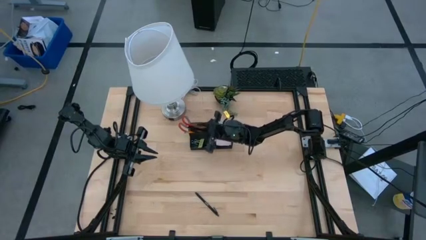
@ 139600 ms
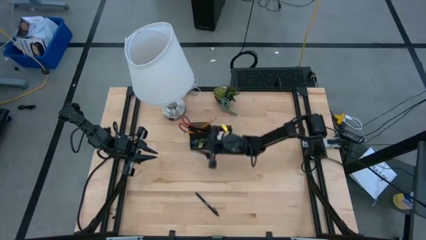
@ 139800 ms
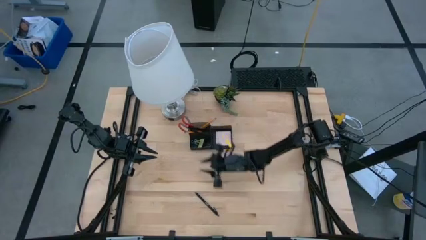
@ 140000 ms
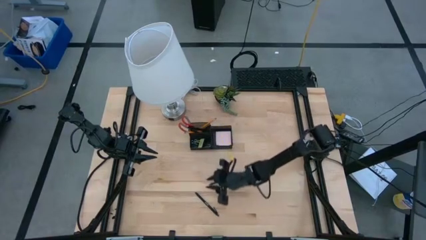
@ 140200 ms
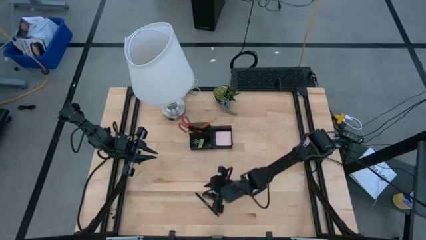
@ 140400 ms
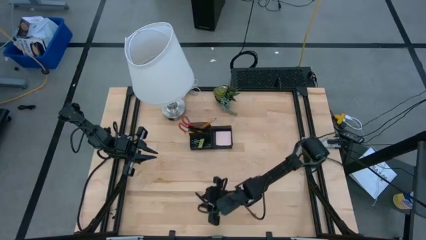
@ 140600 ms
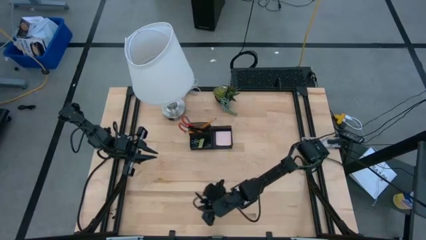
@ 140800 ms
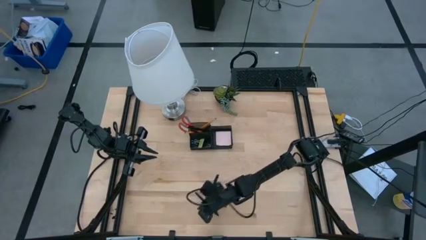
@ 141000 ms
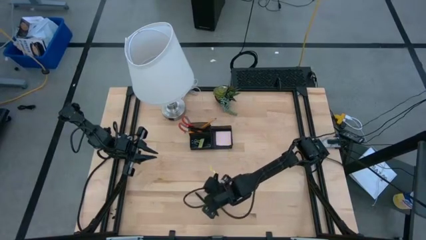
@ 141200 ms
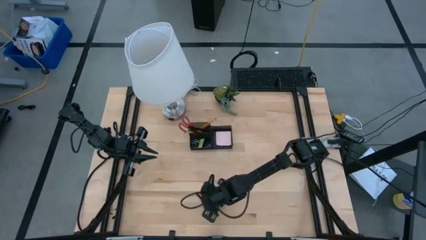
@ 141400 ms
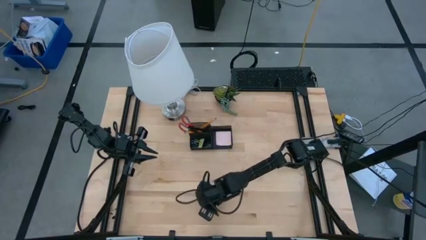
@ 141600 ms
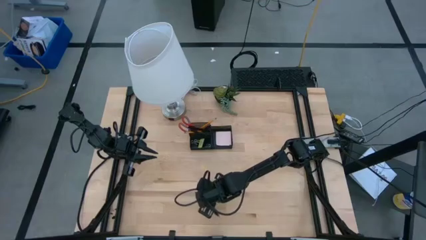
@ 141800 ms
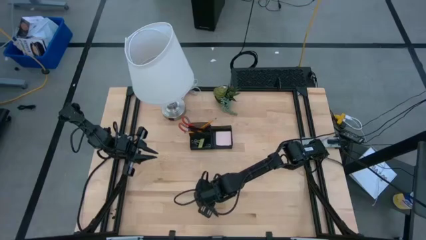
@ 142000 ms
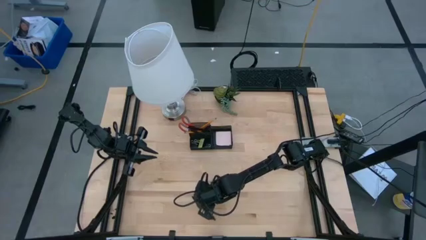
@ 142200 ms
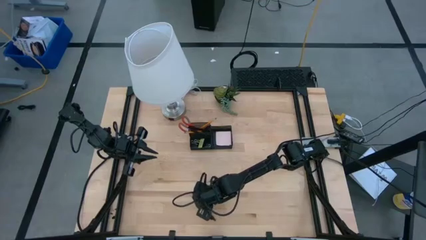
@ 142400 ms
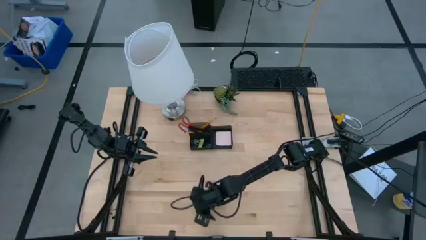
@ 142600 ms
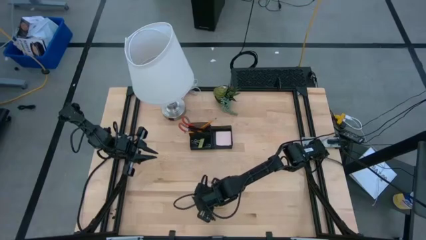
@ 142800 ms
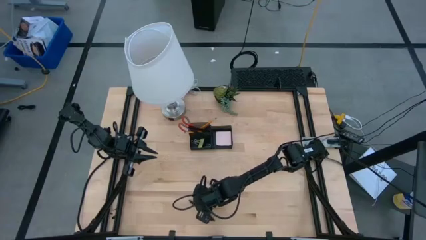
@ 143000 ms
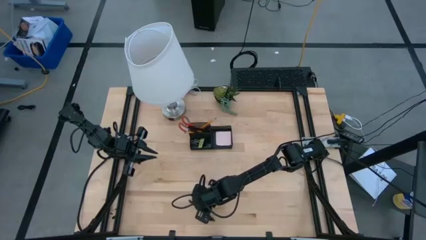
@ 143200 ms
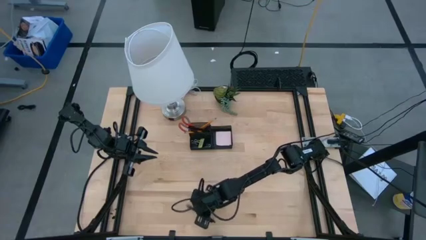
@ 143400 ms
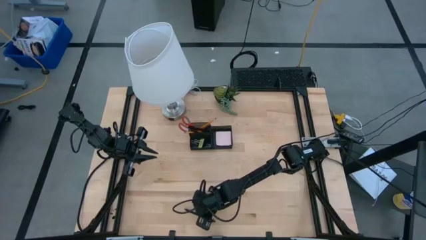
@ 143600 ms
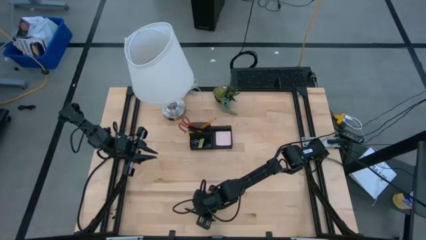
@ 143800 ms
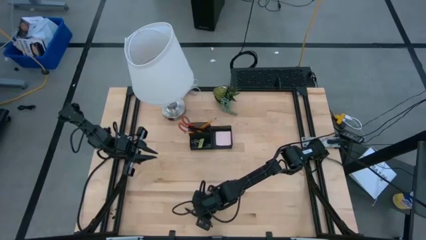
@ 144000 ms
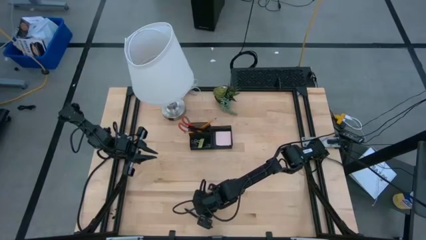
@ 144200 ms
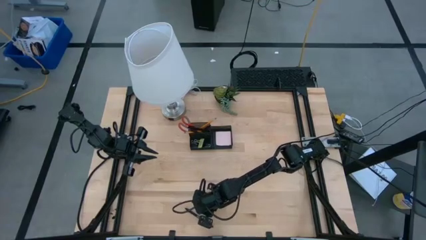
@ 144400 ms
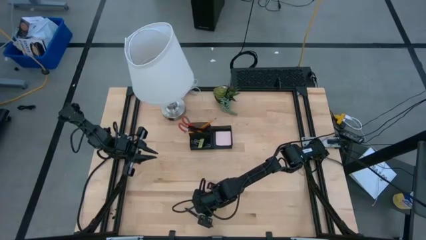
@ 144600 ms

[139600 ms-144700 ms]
Task: Pick and place office supplies into organizer
Put the black pen into the black desk organizer

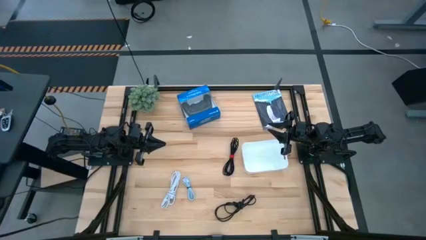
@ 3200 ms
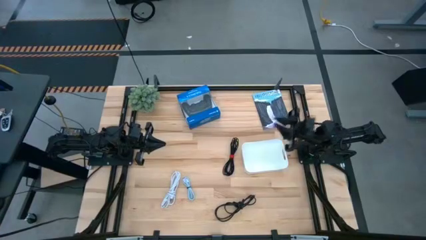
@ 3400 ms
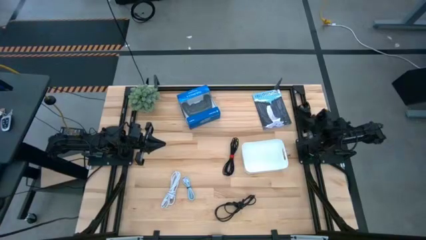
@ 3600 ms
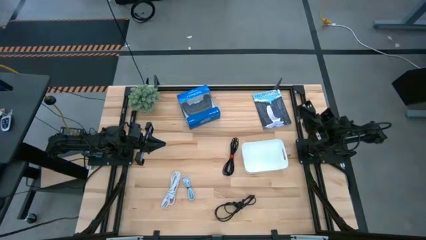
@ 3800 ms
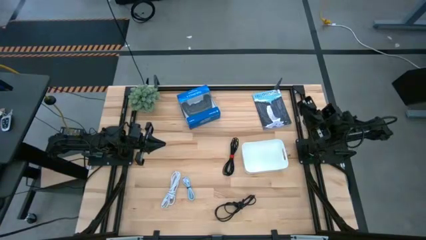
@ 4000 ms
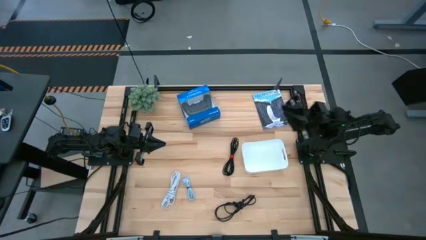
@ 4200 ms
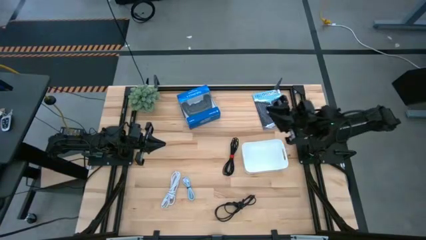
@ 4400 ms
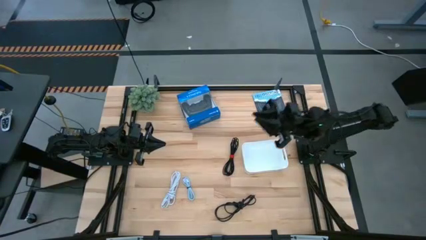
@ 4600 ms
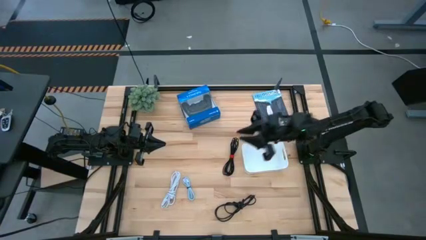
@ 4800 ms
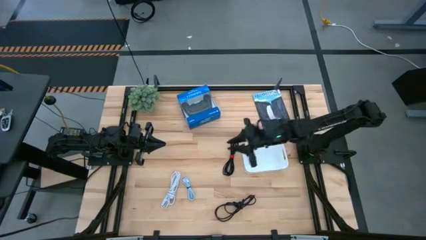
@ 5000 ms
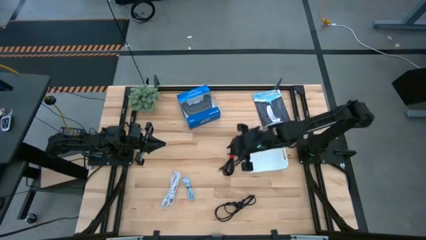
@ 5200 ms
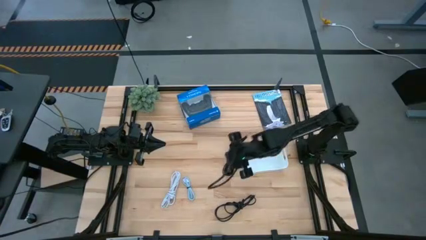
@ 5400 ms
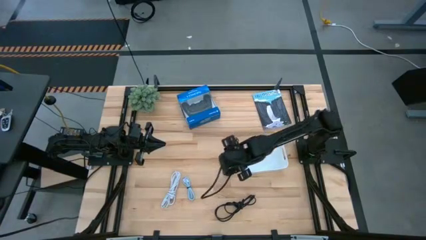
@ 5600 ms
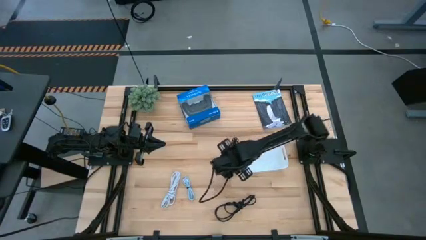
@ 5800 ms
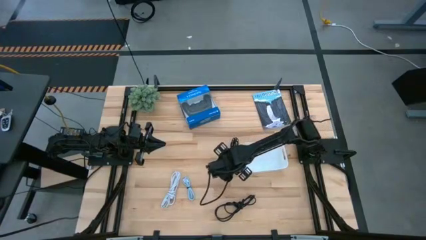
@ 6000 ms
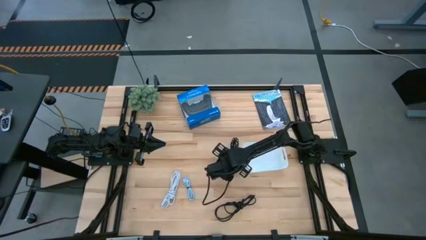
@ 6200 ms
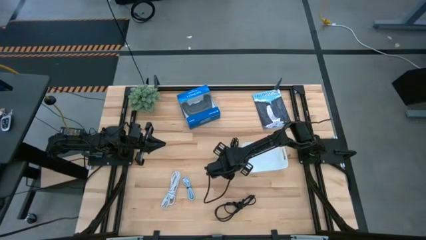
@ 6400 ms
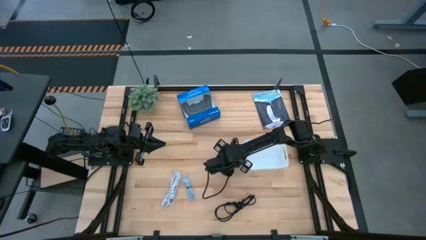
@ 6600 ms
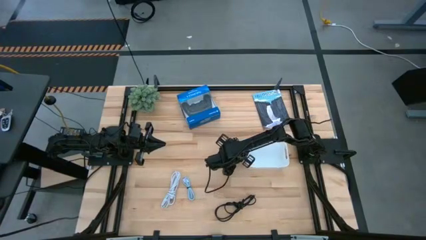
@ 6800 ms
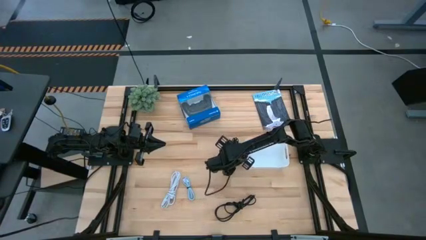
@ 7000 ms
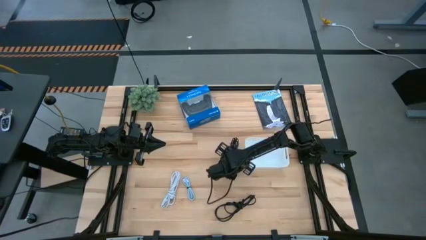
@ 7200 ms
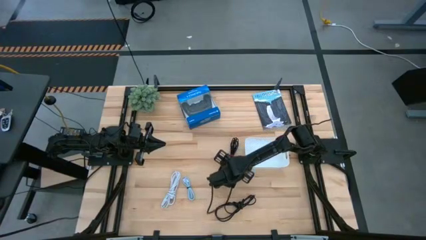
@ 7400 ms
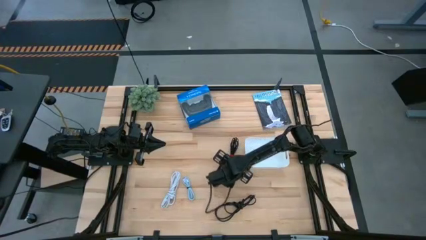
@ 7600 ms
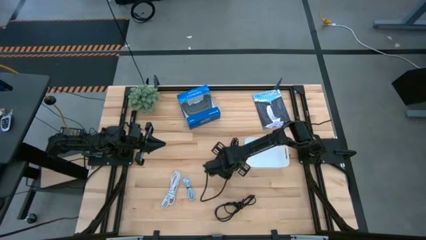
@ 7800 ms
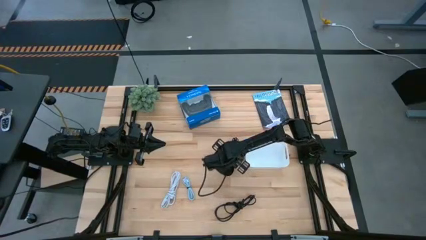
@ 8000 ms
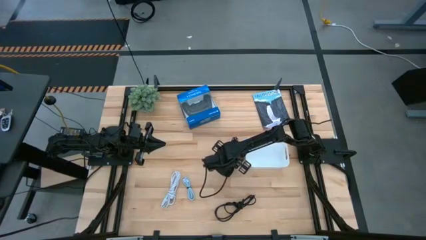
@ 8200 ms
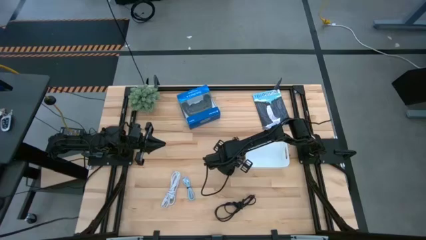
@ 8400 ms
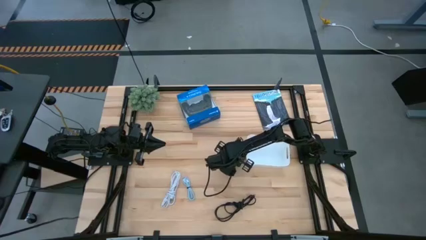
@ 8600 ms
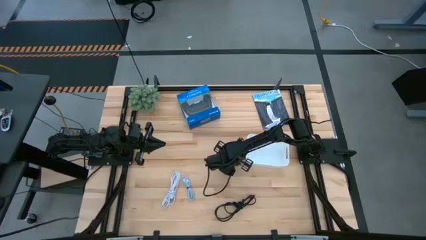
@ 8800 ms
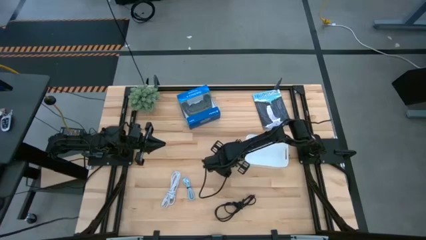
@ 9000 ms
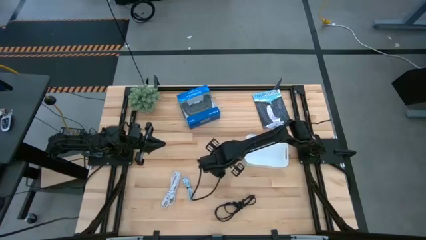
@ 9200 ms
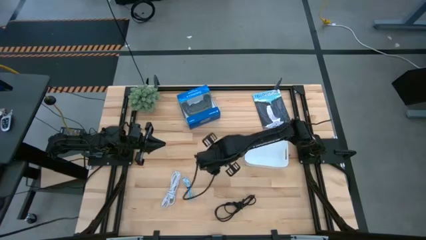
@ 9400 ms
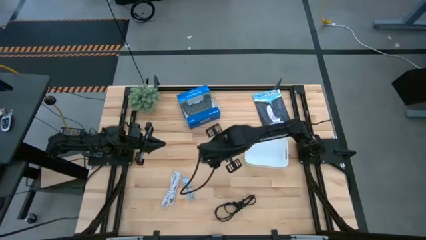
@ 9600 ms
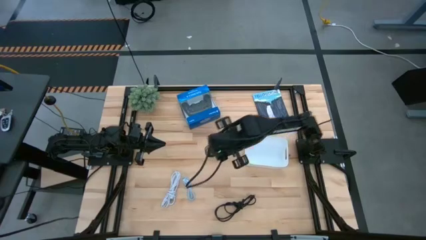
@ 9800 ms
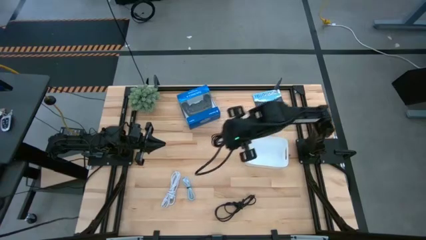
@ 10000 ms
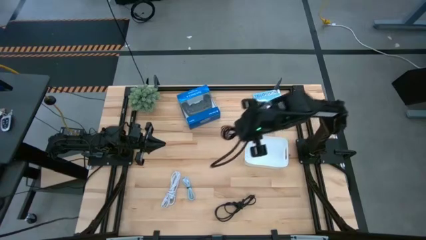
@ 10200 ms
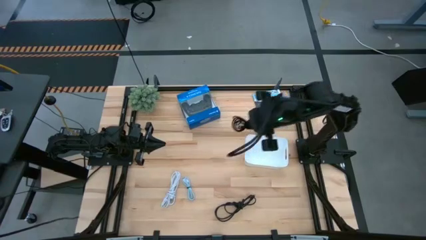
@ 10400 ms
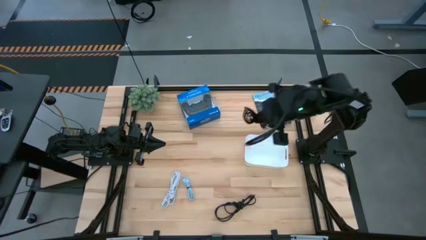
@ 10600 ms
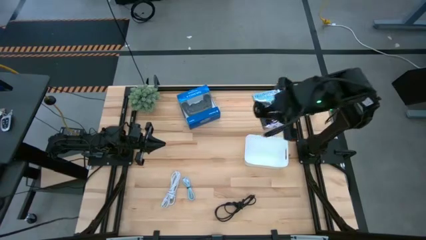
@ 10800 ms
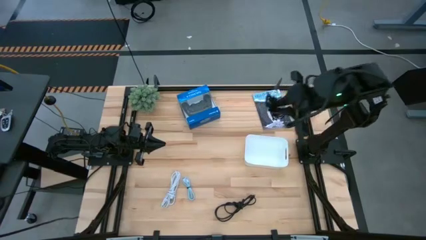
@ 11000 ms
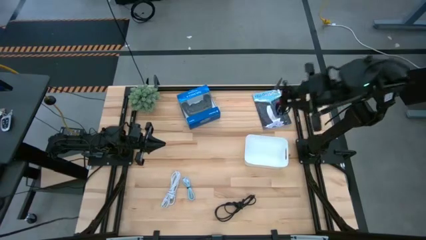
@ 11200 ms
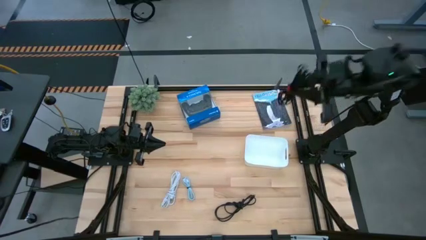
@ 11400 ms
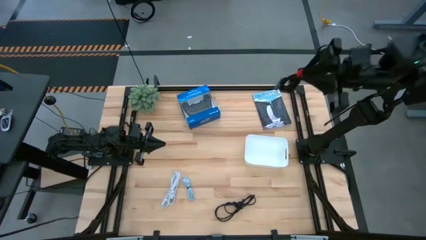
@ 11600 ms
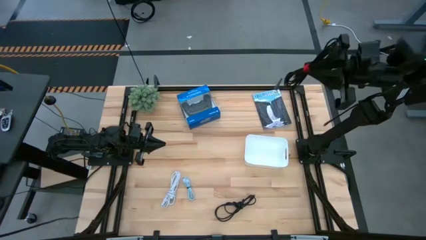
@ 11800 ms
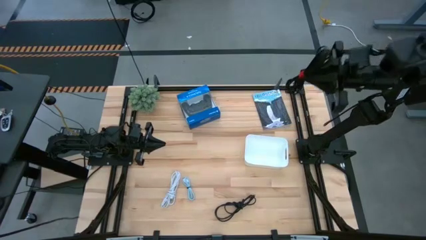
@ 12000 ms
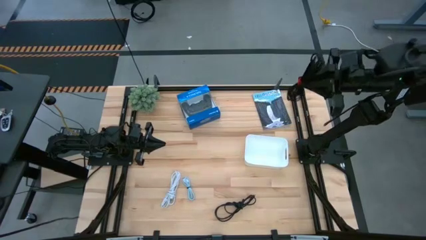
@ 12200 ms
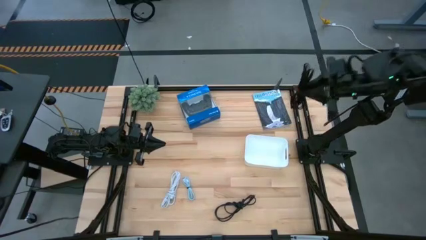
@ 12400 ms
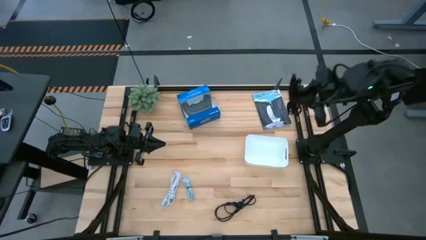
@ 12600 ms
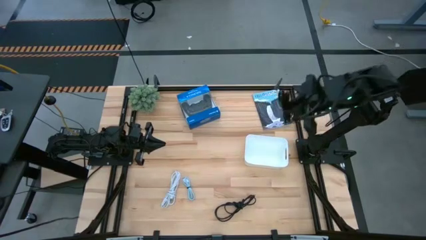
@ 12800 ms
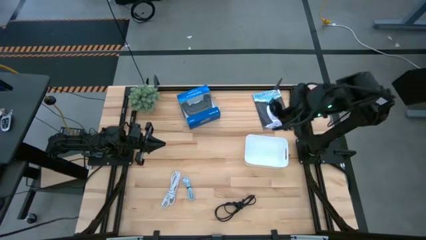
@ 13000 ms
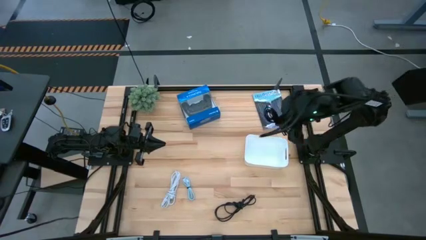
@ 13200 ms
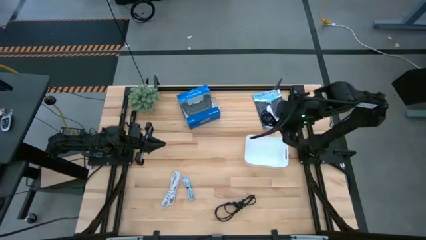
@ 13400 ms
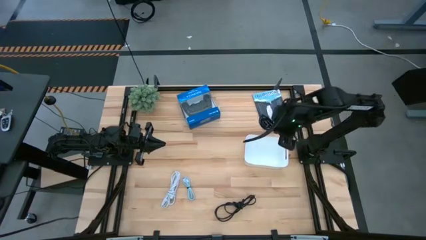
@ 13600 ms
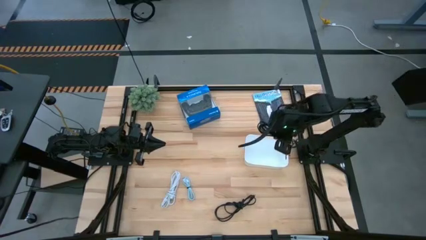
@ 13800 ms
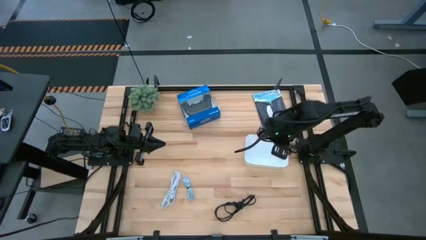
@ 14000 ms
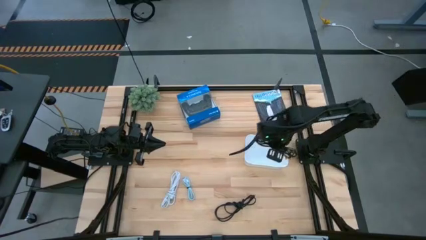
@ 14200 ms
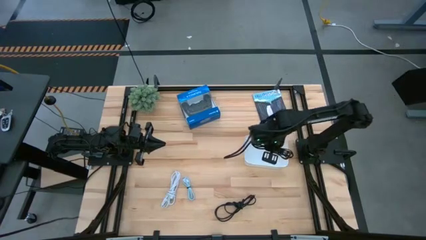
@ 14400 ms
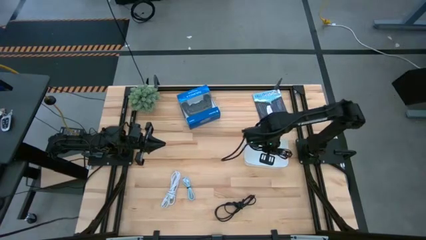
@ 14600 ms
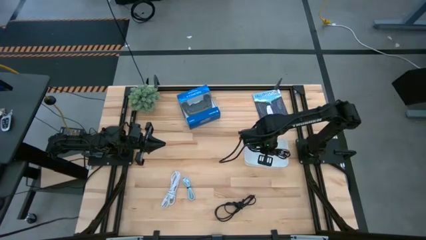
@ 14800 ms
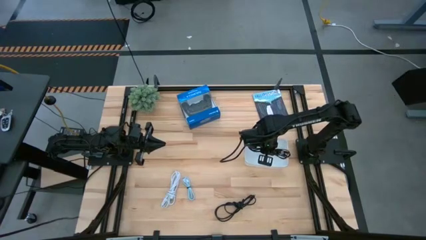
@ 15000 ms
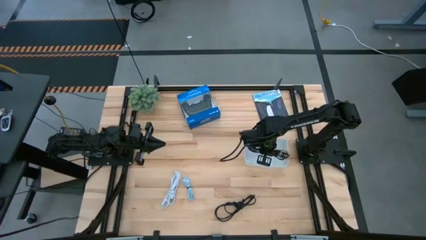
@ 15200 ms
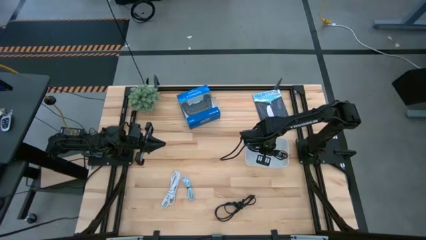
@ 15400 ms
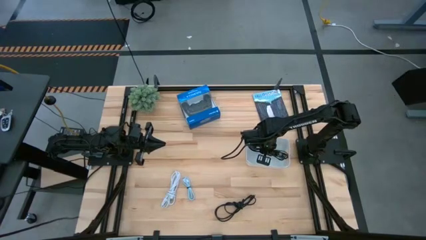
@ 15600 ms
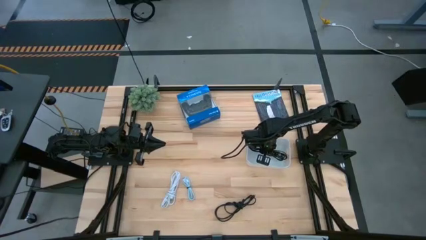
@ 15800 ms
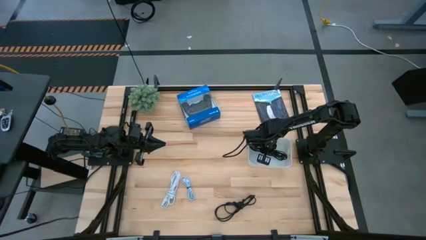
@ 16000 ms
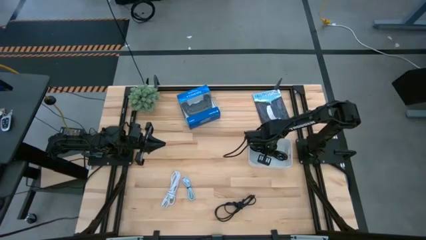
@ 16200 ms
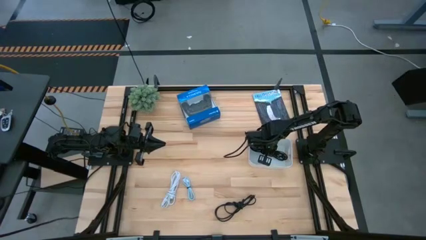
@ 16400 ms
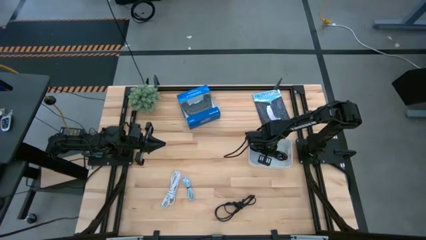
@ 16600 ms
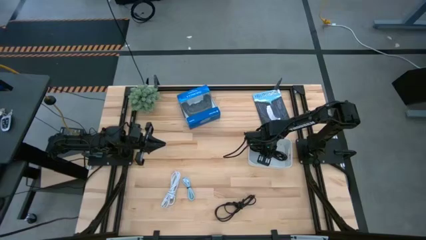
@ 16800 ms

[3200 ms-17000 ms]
Task: Pick and place USB-C Cables
Put the top black USB cable into the white bin
